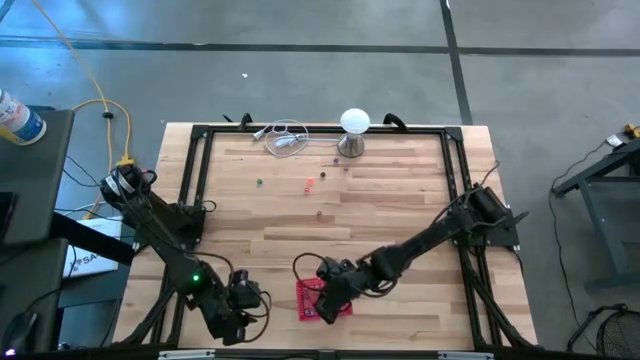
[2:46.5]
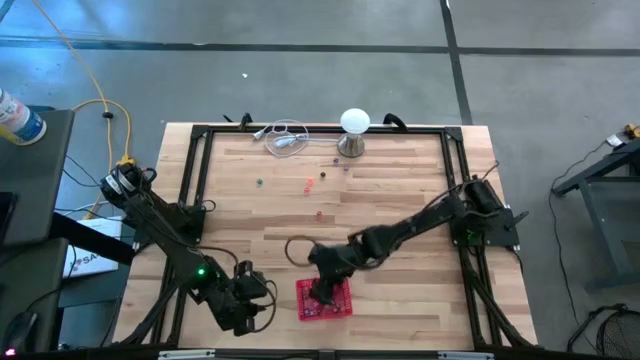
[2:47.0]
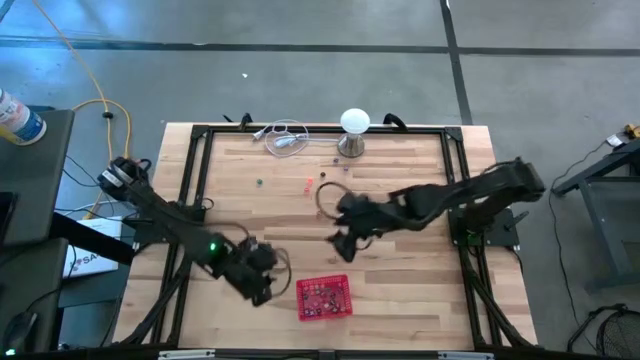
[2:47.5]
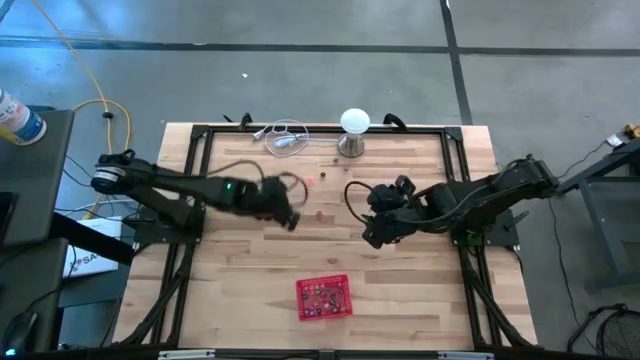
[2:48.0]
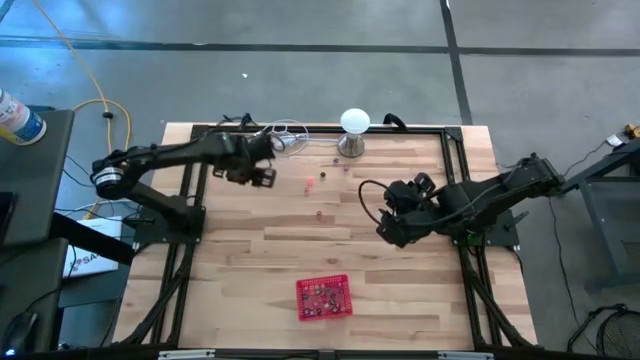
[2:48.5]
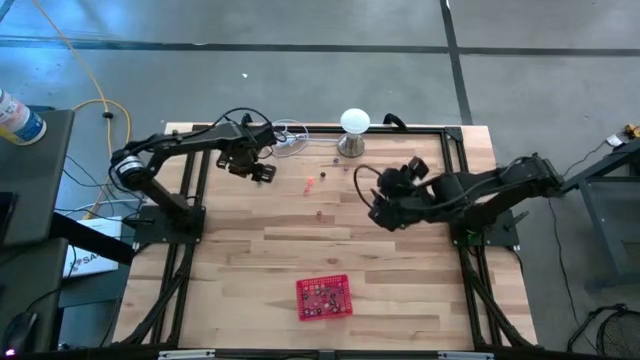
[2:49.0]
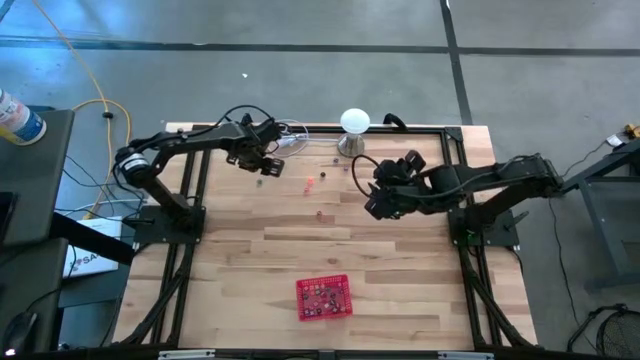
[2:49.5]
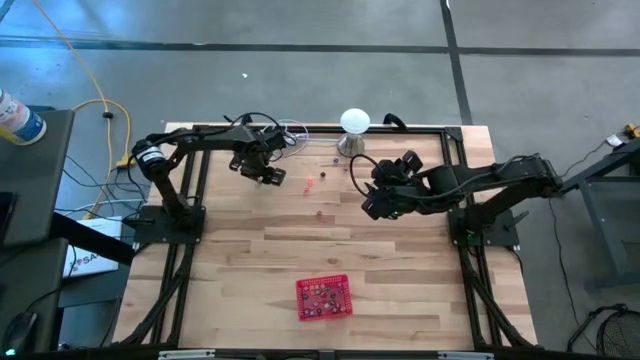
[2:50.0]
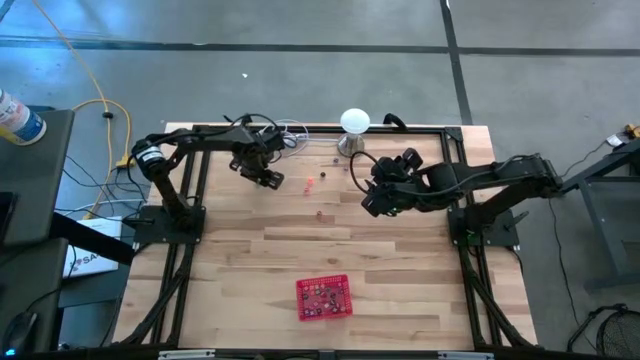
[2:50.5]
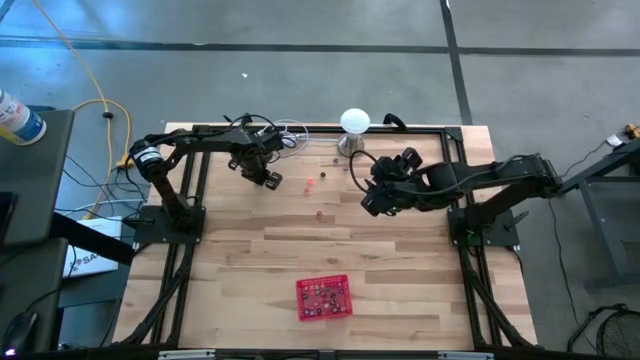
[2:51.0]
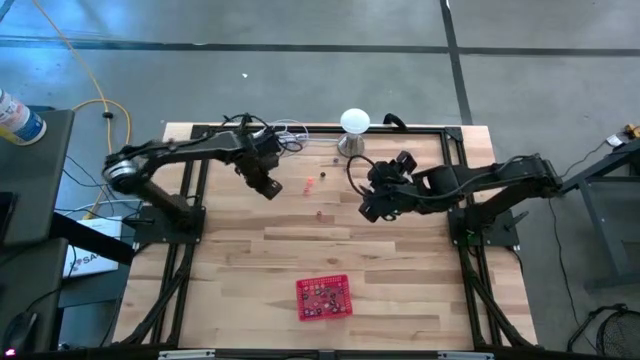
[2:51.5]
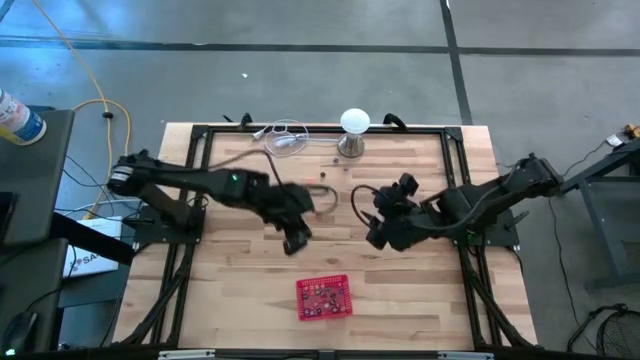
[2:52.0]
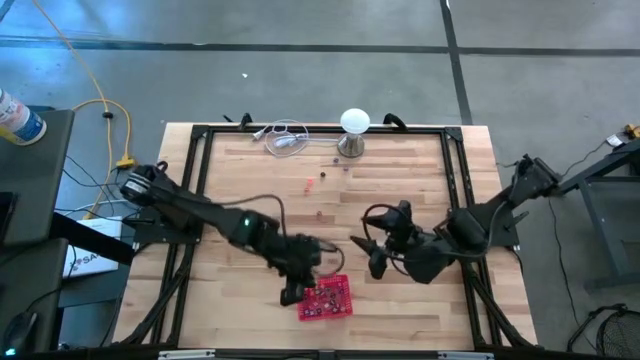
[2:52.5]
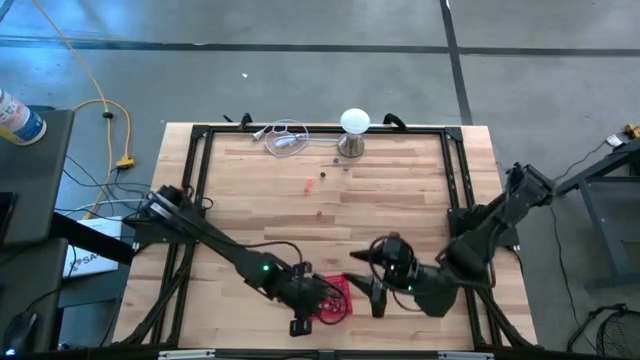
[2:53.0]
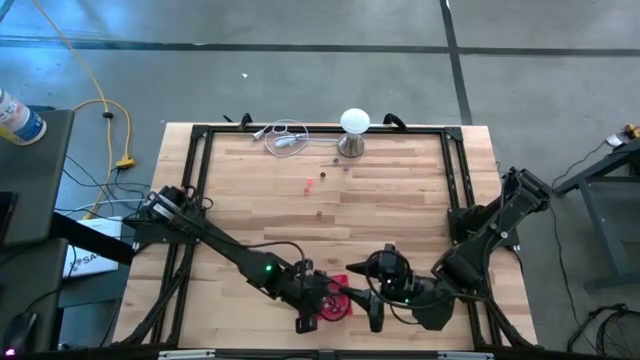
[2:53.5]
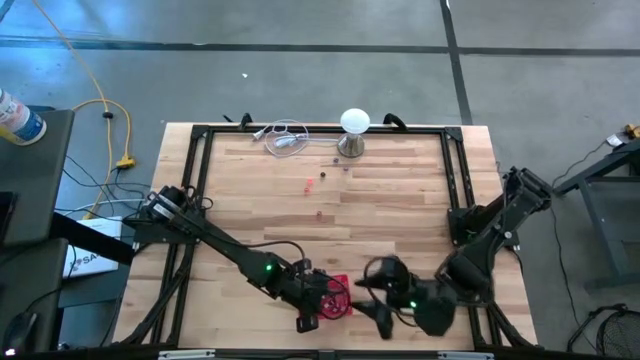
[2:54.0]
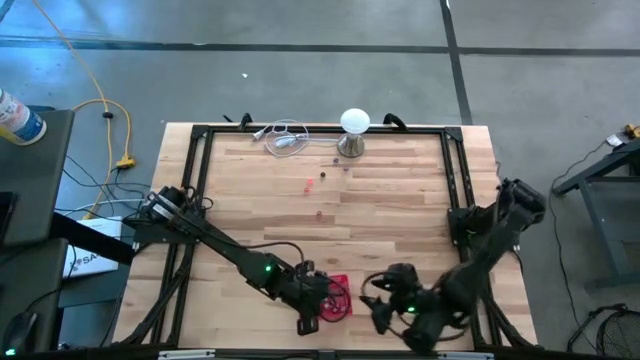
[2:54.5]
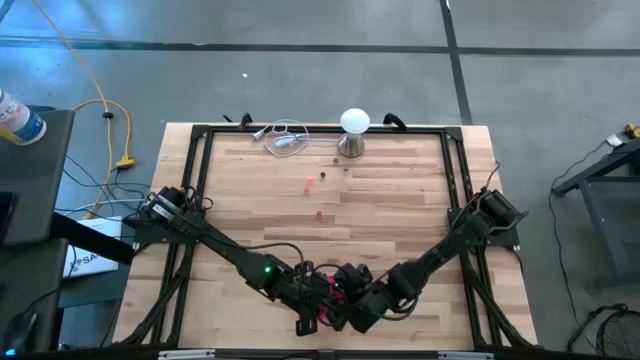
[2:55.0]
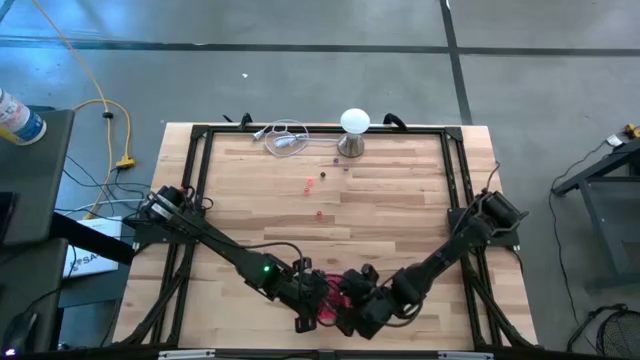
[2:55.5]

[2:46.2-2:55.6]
Task: Pick & Place Dice
Put the green dice into the red bin

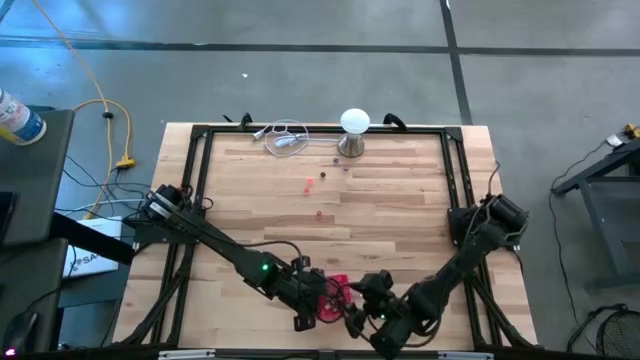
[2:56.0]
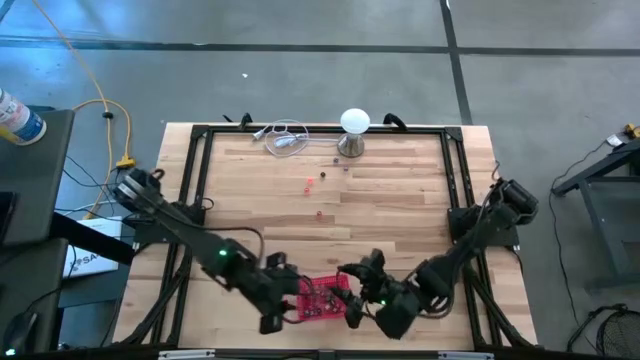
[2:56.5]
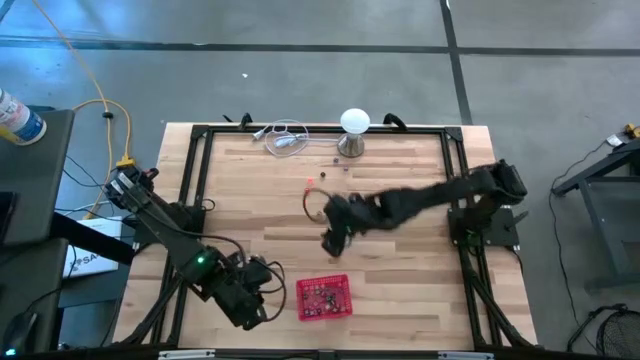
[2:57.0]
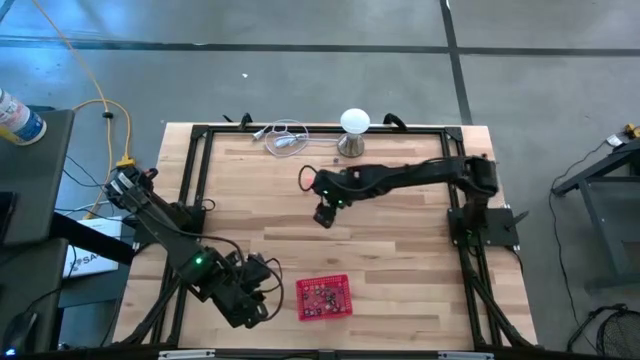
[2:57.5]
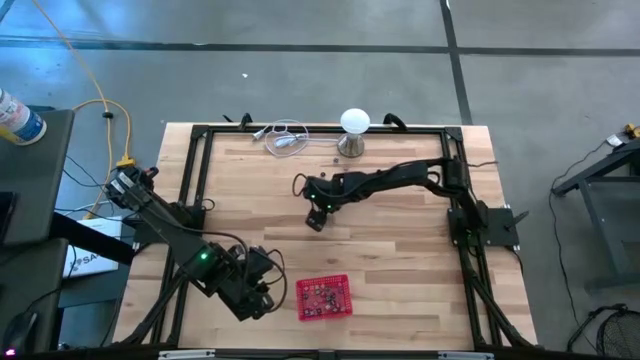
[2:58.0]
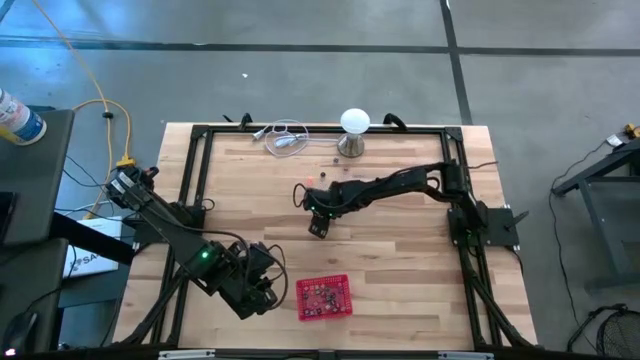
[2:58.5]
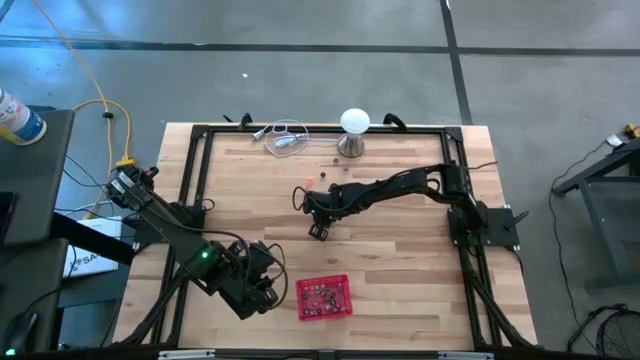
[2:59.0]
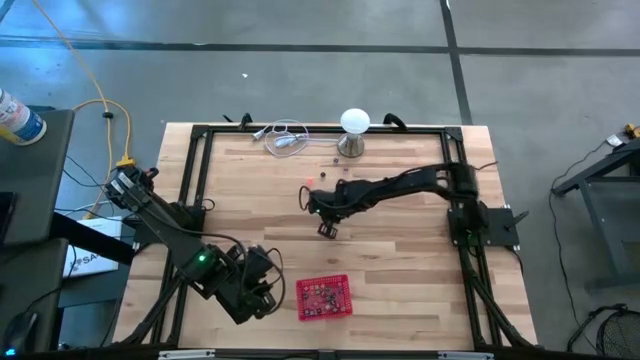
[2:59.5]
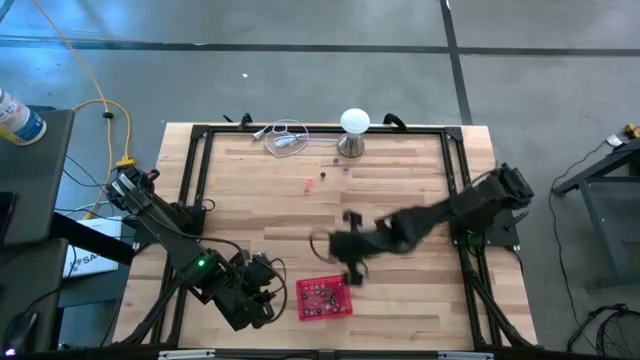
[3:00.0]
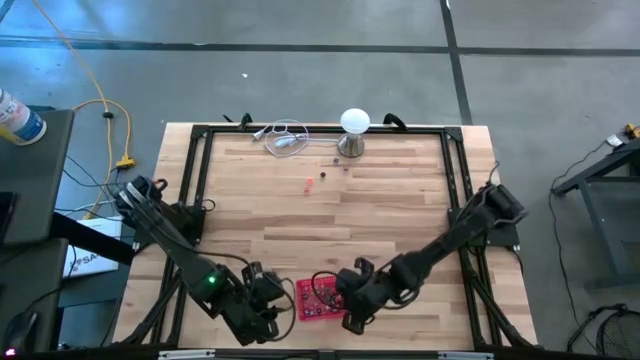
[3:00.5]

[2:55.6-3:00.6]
Put the red dice into the red bin

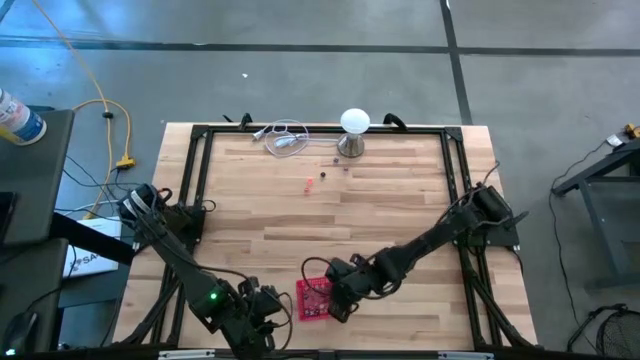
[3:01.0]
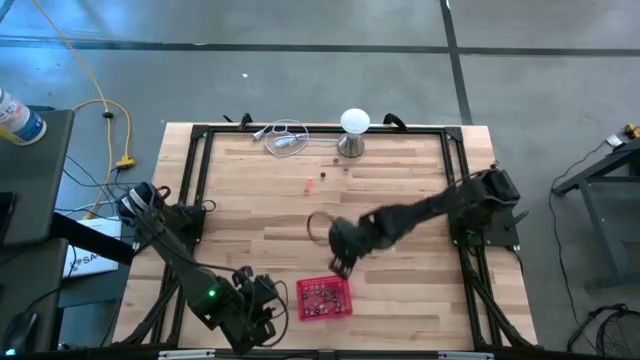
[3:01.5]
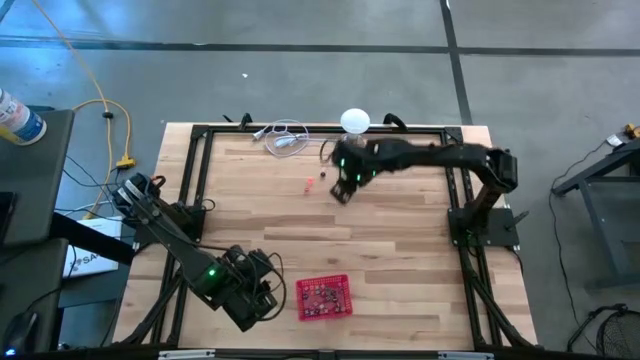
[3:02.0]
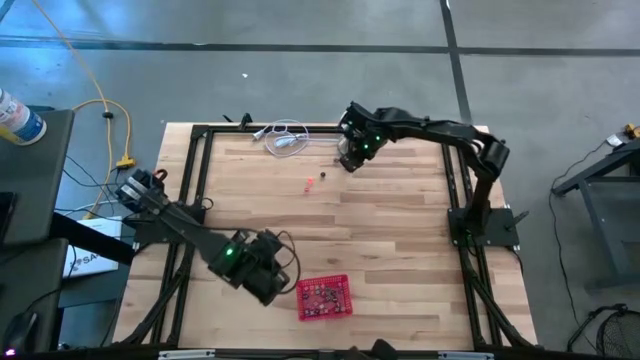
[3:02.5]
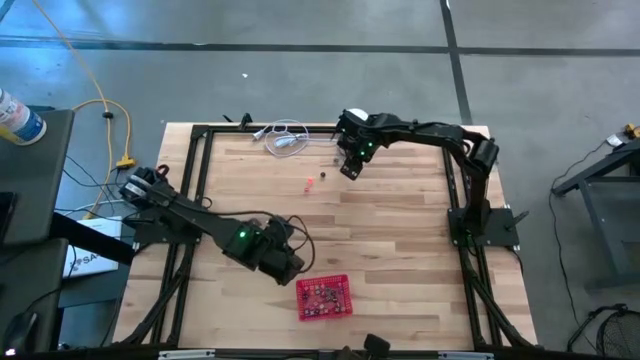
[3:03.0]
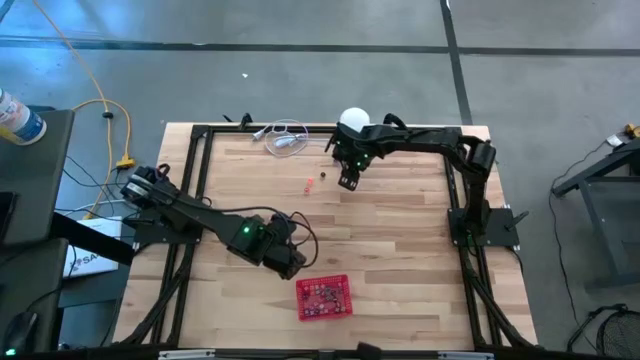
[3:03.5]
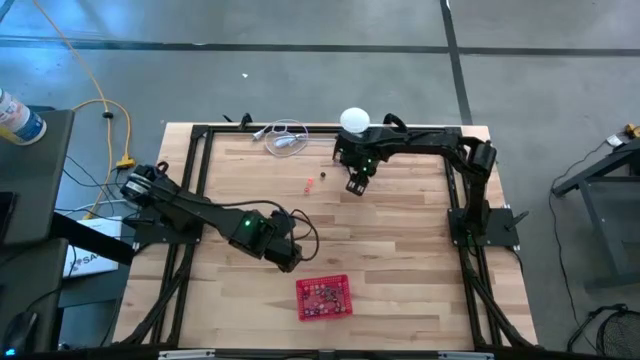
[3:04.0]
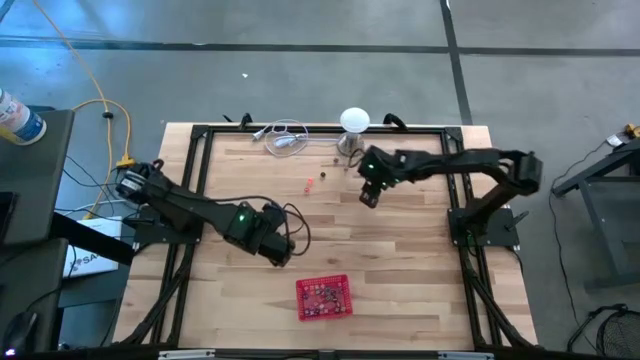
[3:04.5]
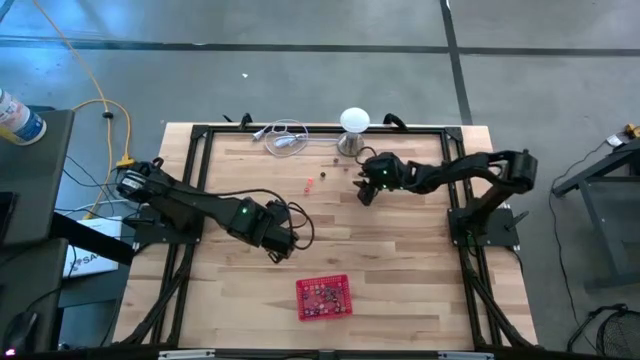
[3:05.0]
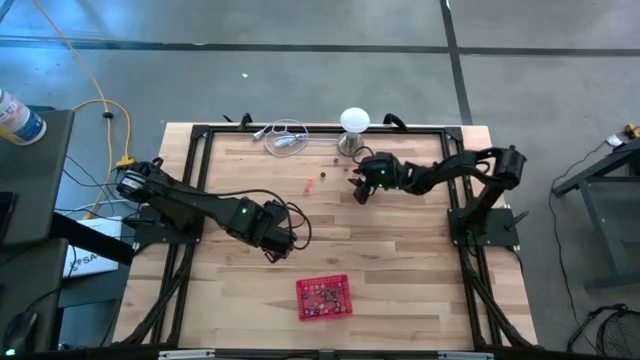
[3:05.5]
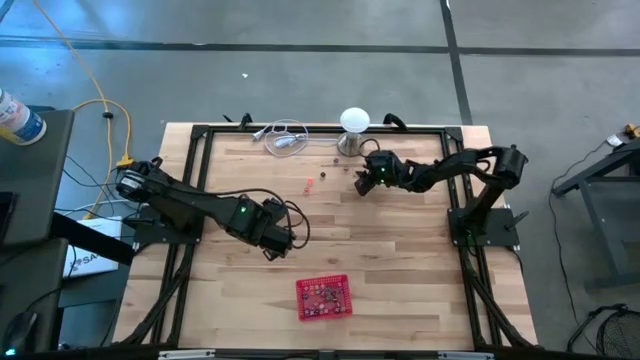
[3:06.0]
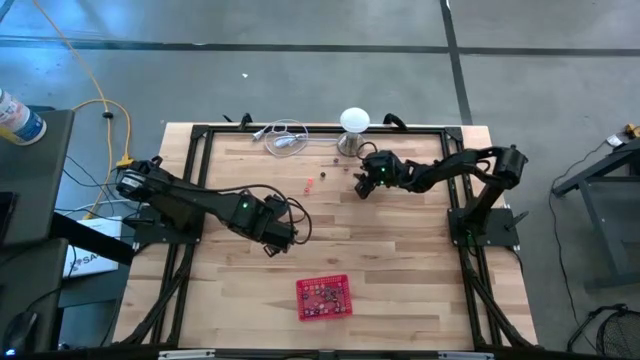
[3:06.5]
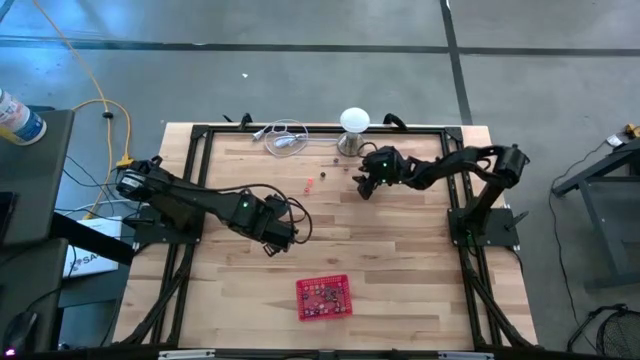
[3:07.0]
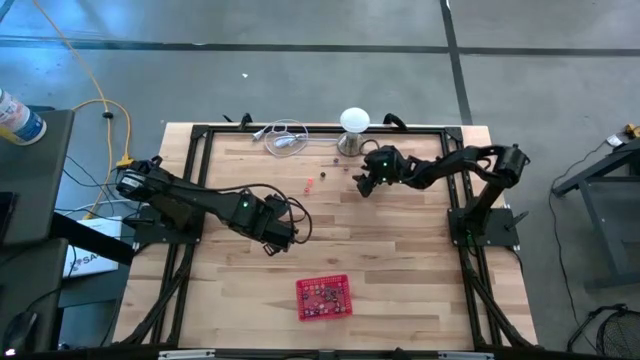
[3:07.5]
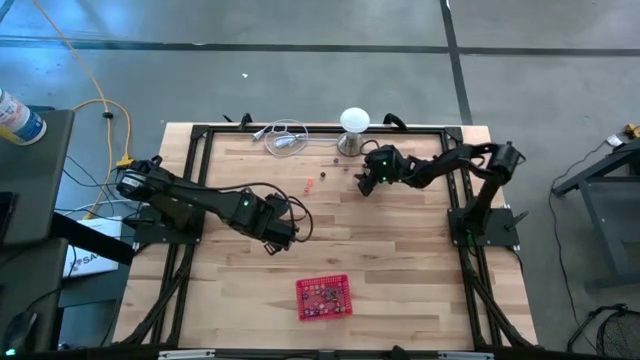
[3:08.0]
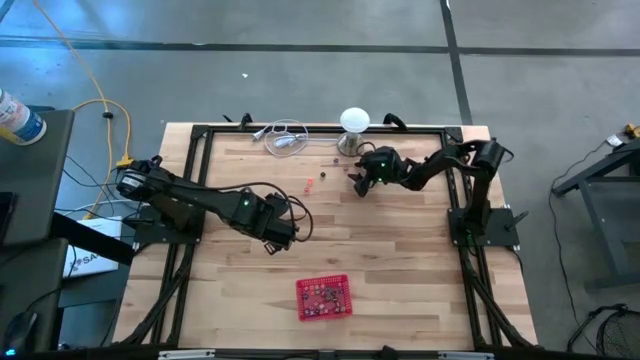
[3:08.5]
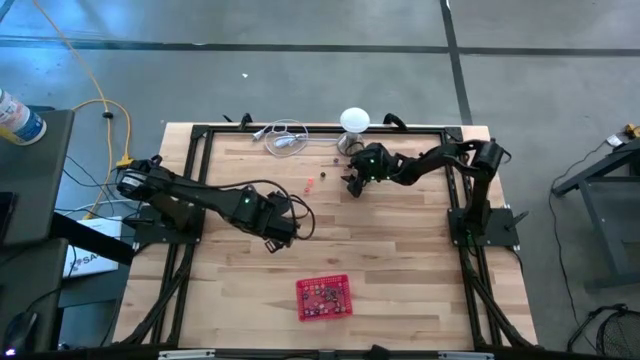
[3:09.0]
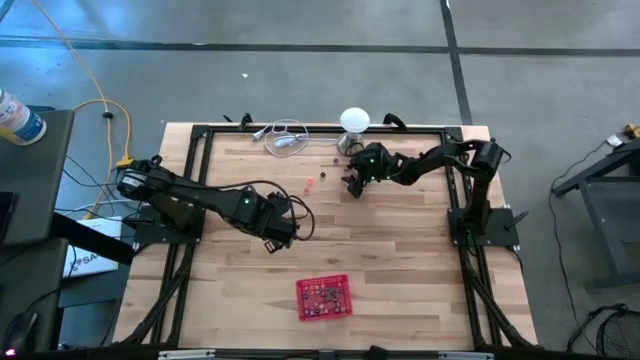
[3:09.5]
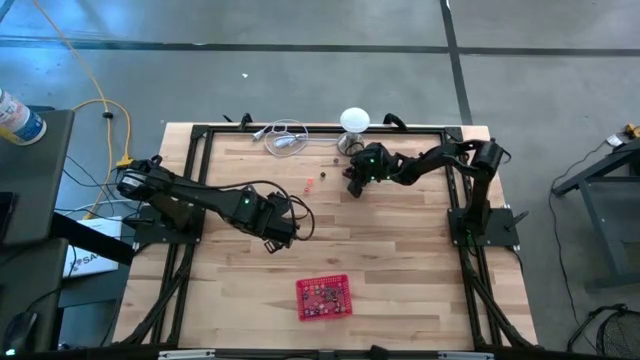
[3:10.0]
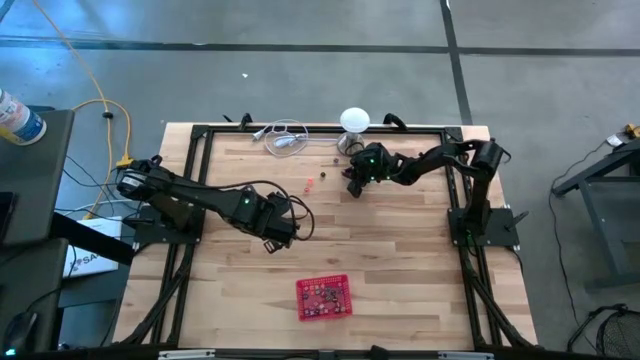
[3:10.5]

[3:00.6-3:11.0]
Put the purple dice into the red bin
